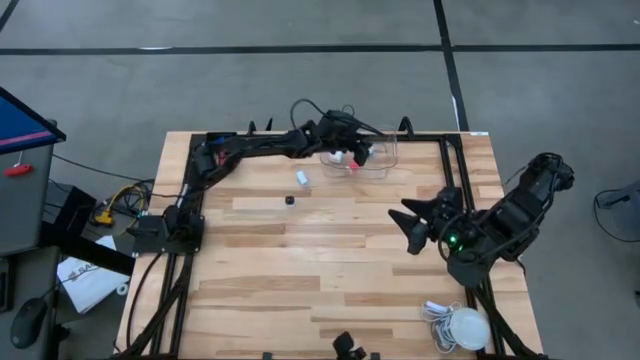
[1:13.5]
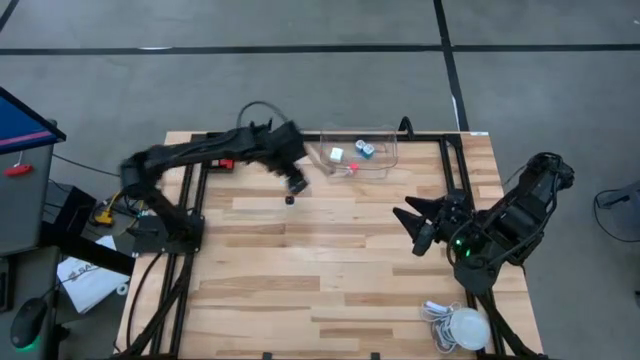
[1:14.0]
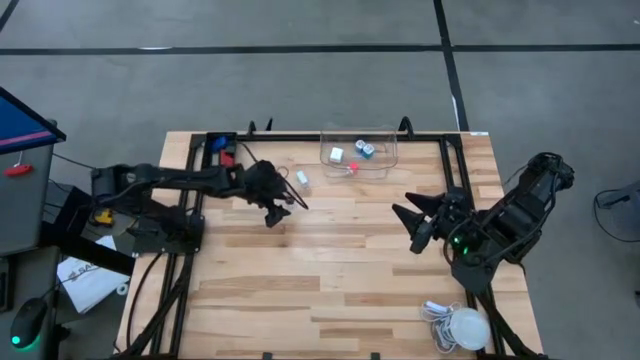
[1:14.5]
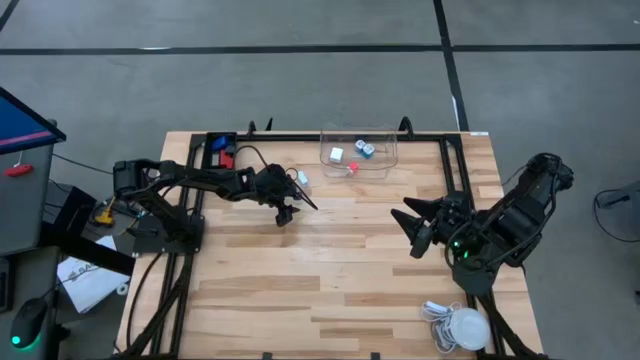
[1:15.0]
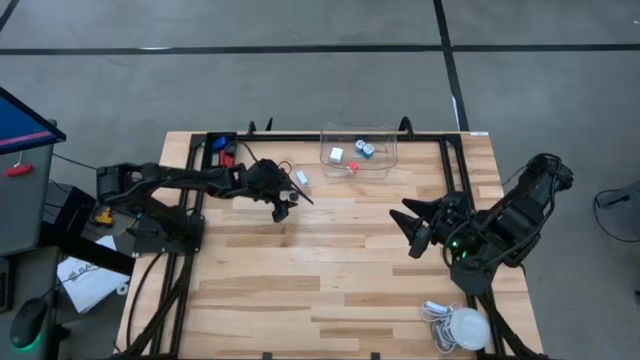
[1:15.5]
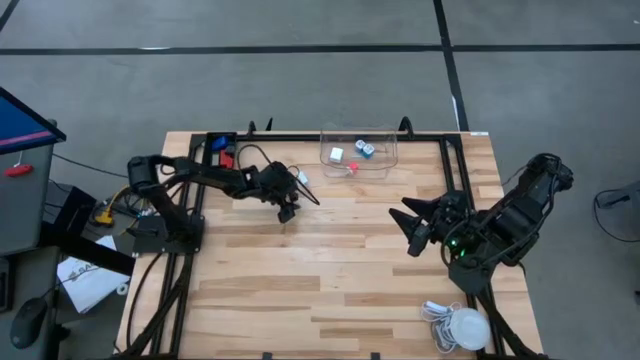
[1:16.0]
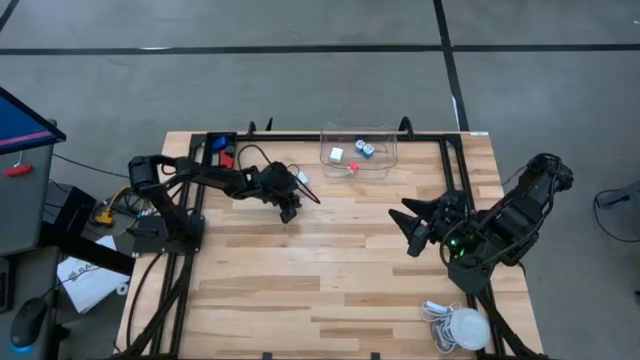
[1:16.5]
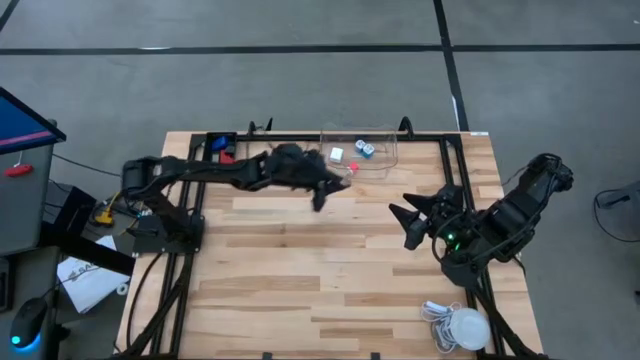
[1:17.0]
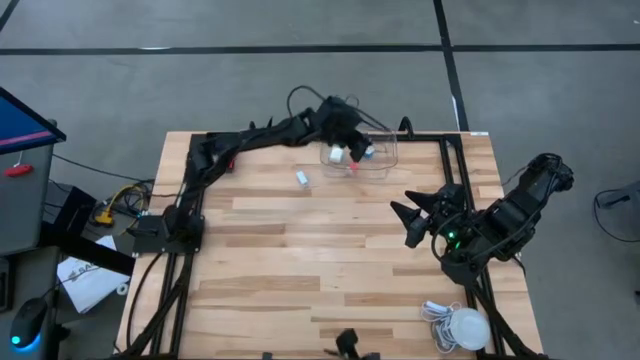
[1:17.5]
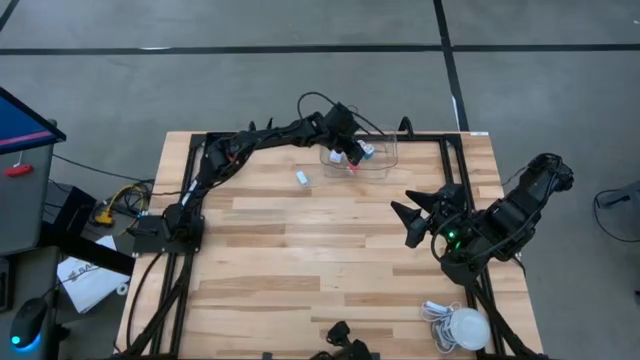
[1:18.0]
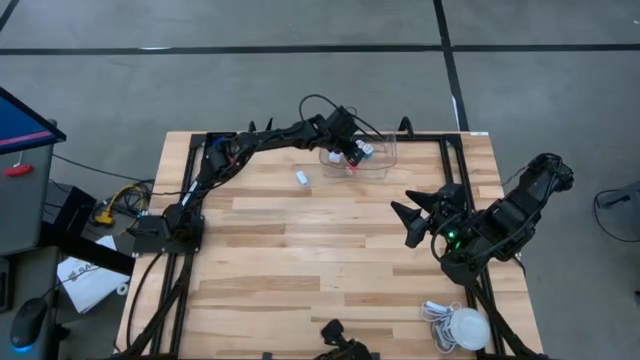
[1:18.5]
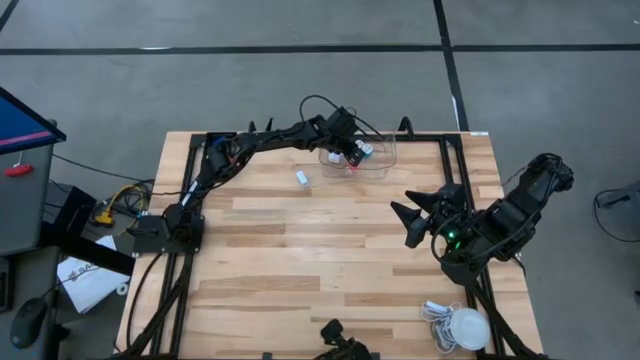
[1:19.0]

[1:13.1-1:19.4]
Task: Pick & Place Office items
Put the white black charger adapter into the transparent bin

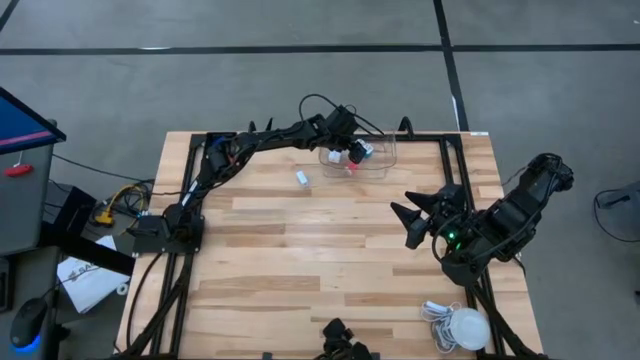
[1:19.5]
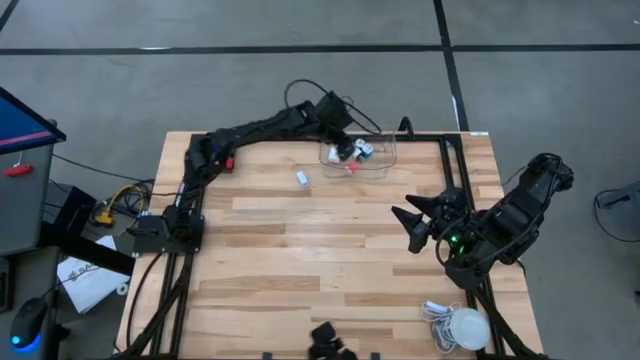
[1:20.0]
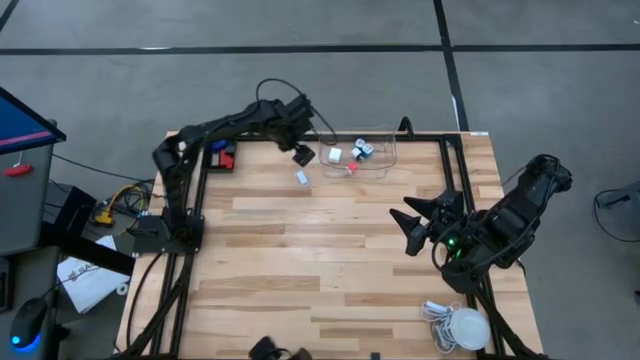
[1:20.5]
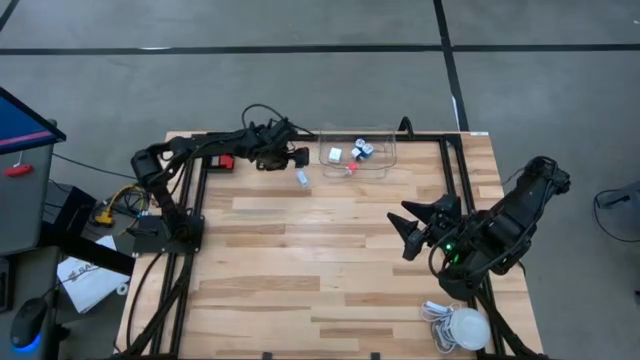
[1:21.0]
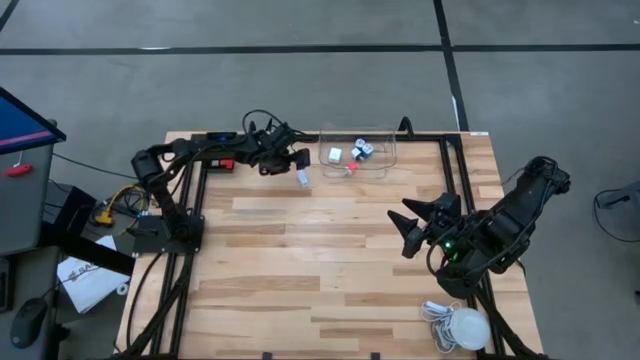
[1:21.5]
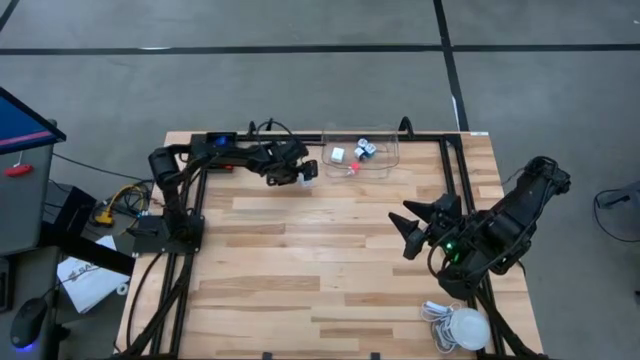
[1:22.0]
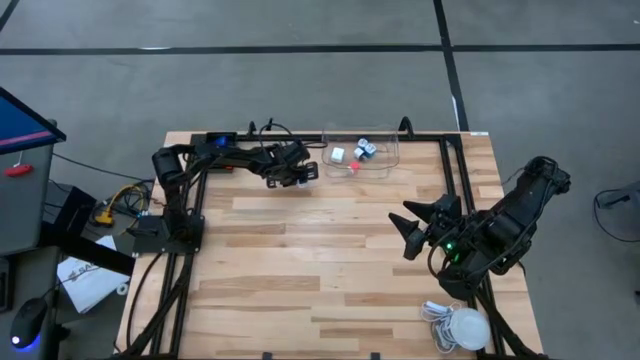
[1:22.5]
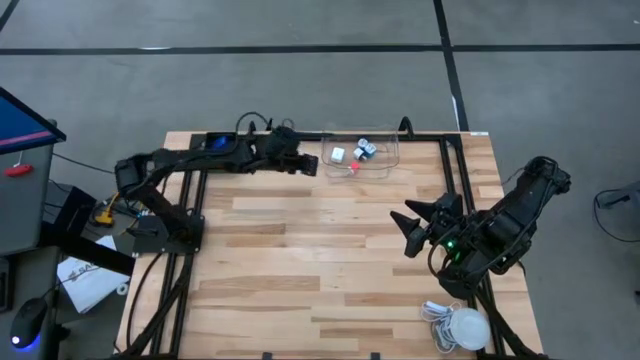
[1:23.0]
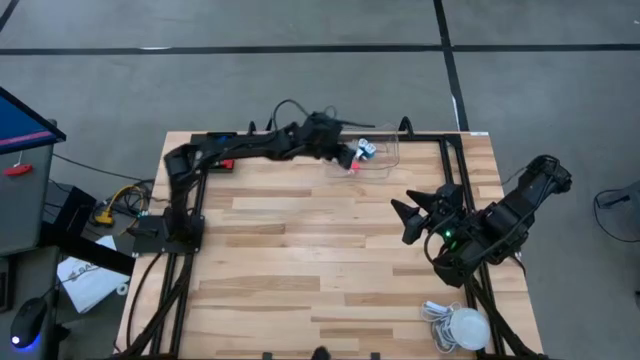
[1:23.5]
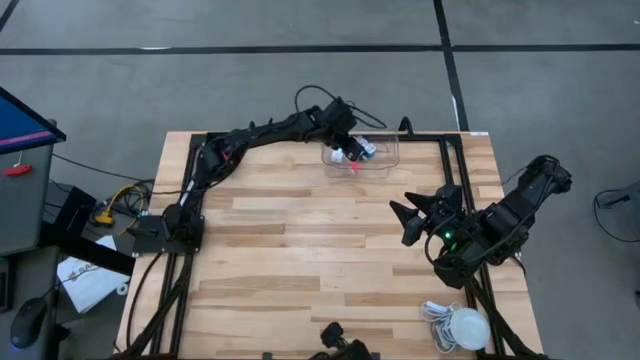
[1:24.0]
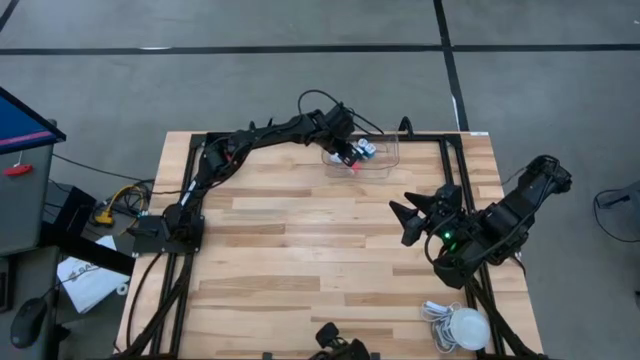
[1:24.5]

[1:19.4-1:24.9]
Put the white charger adapter into the transparent bin

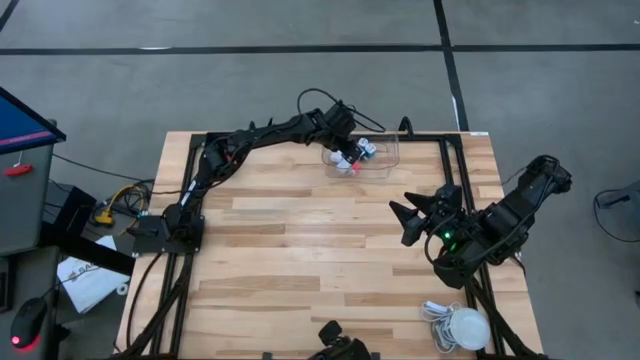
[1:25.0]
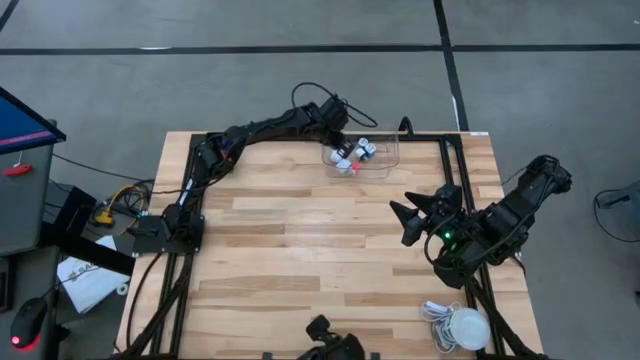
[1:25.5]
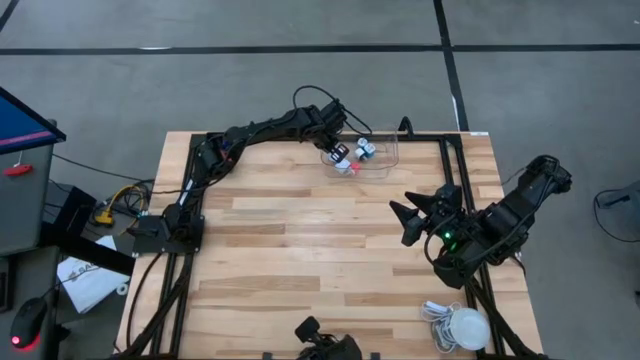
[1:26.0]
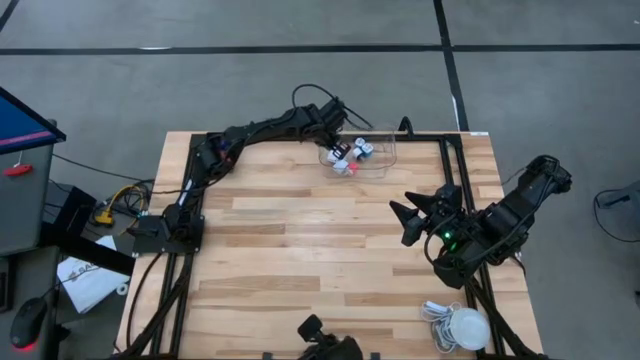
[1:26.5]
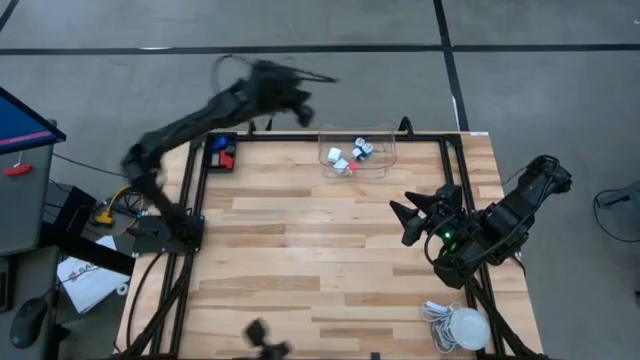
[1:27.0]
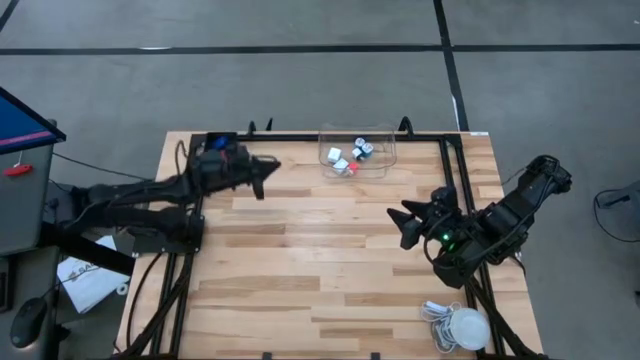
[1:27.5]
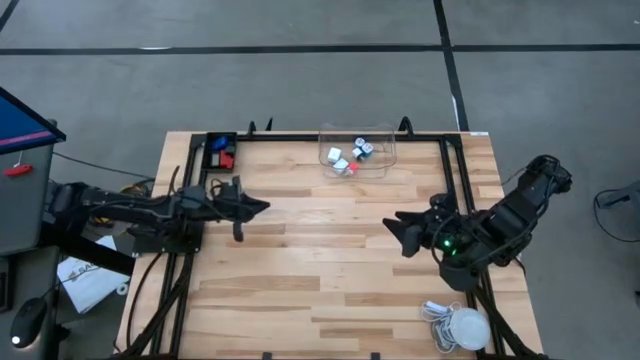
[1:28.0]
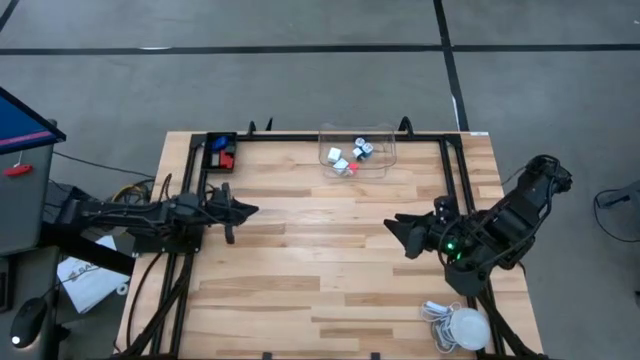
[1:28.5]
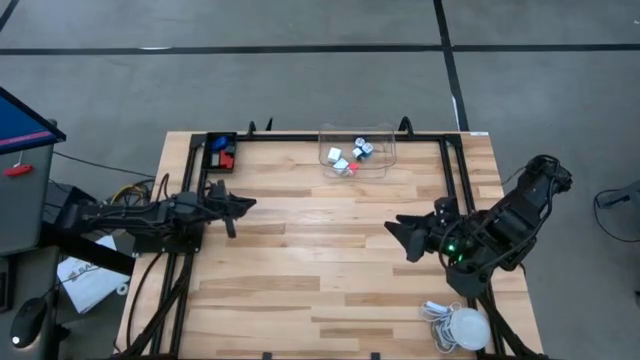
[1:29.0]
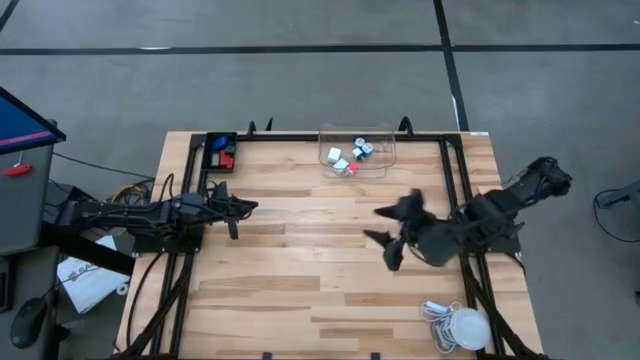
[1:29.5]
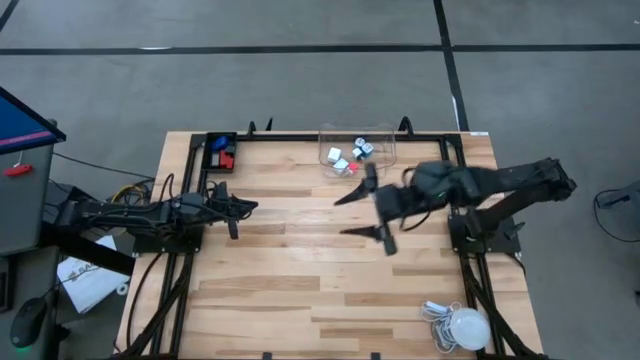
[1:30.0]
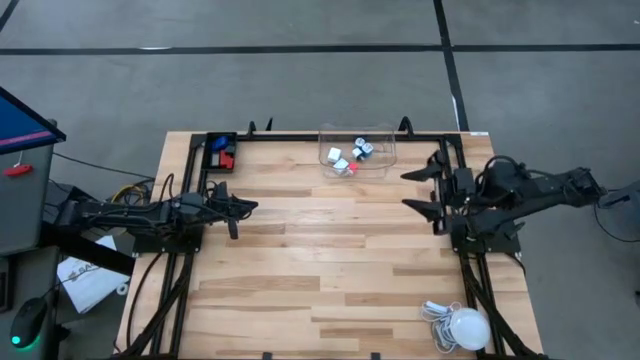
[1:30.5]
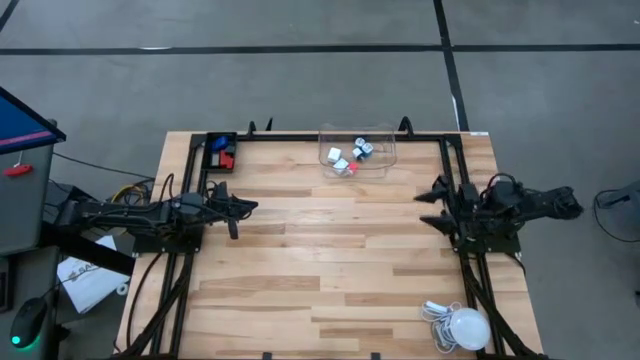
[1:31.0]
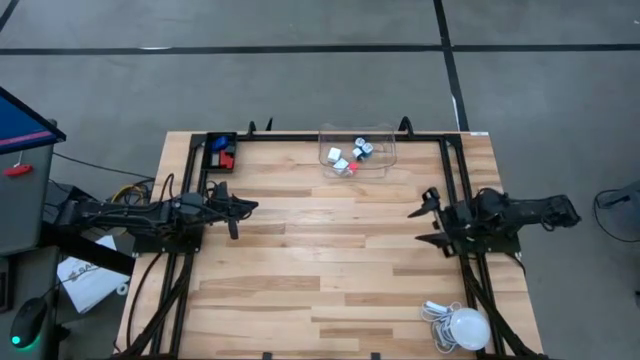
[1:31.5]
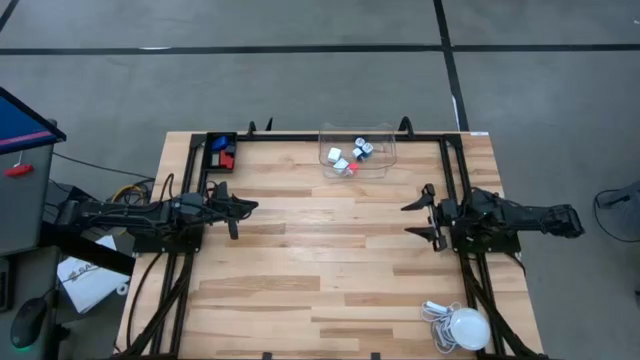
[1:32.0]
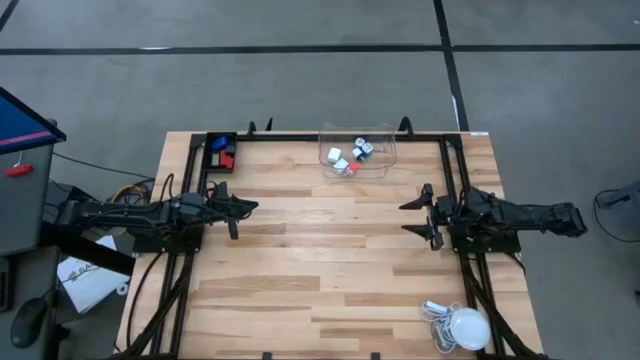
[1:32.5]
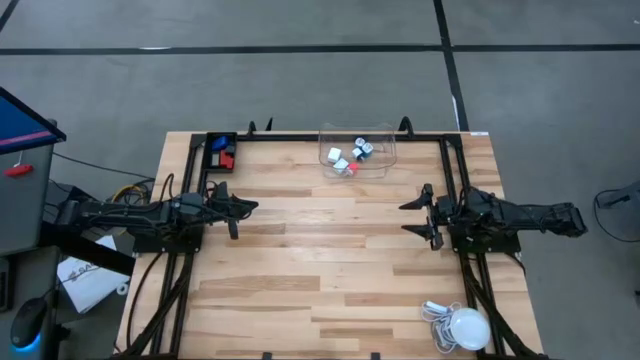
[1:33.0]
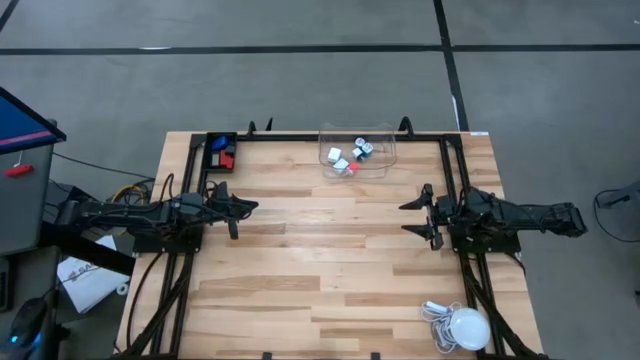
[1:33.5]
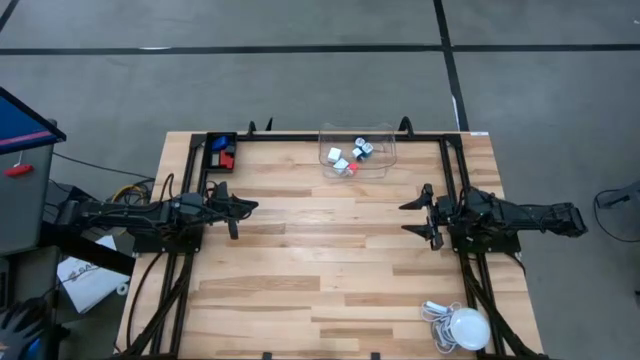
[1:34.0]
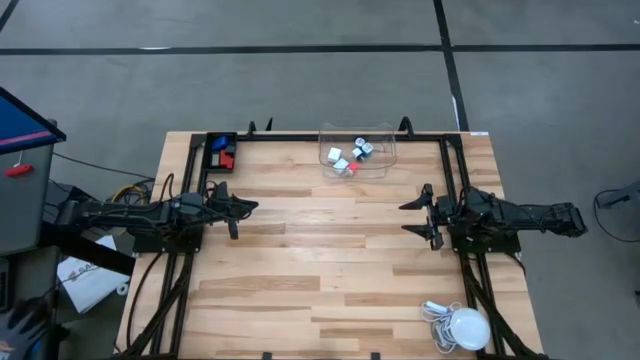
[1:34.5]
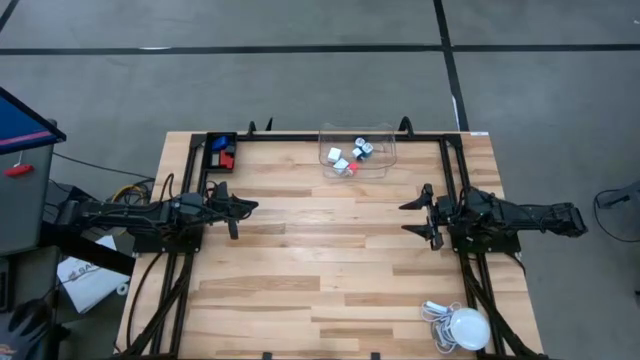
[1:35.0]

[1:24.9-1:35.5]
Return to Home Position
